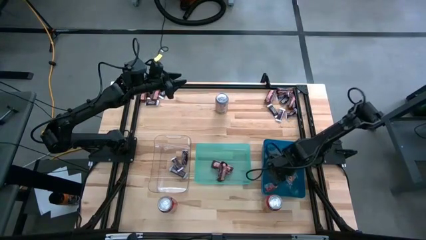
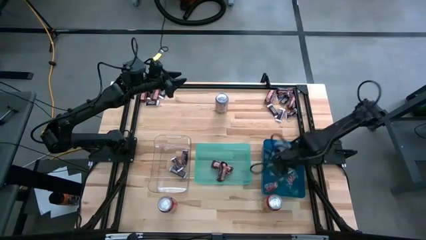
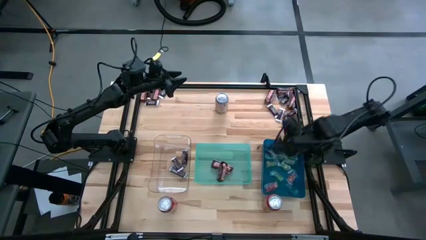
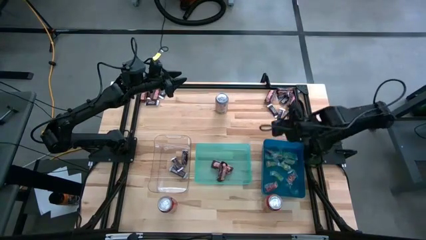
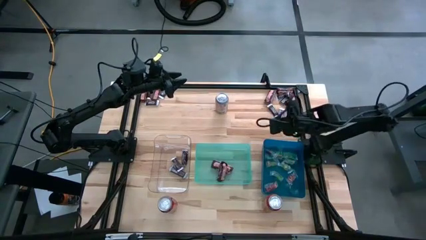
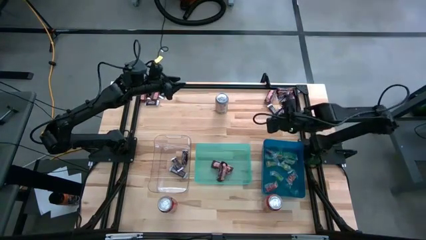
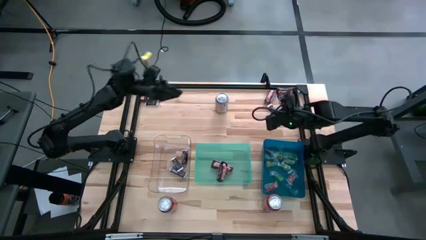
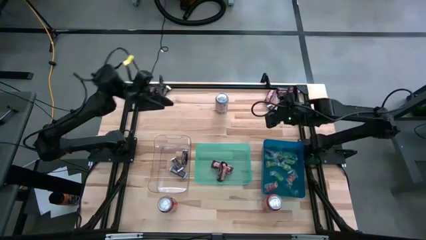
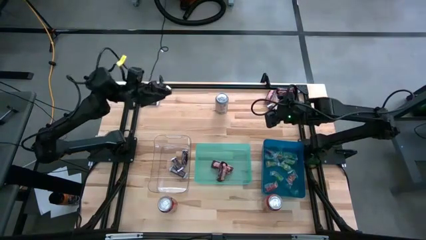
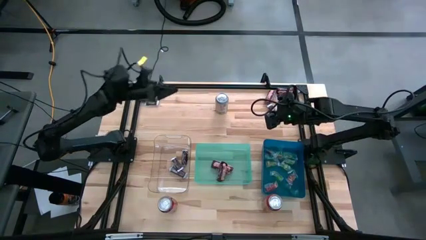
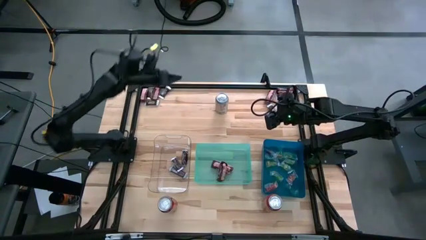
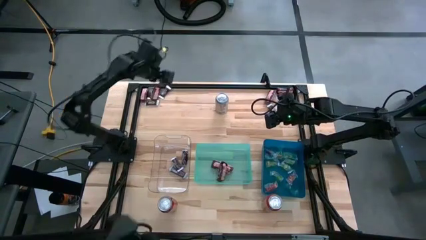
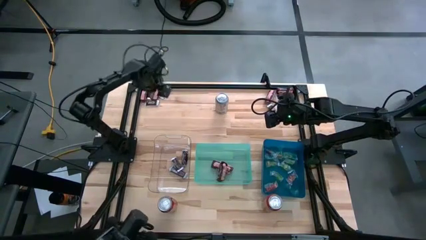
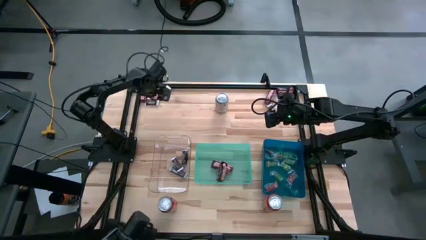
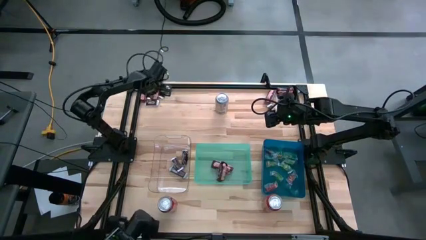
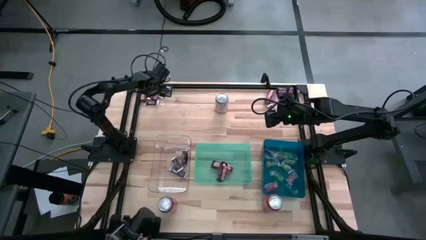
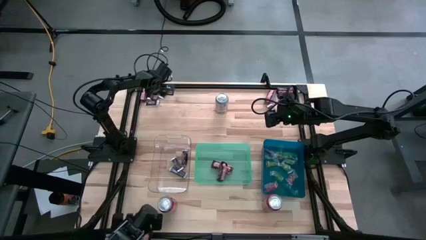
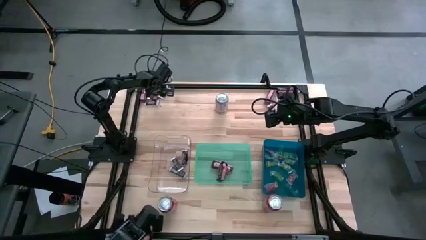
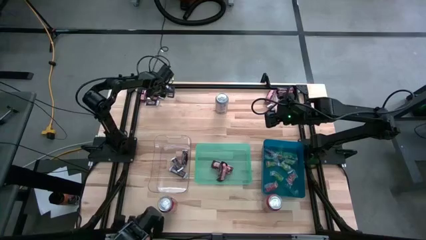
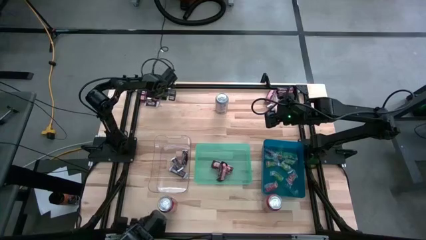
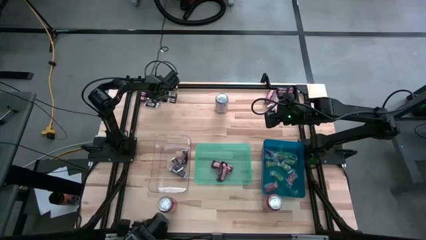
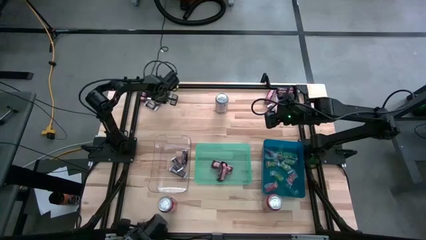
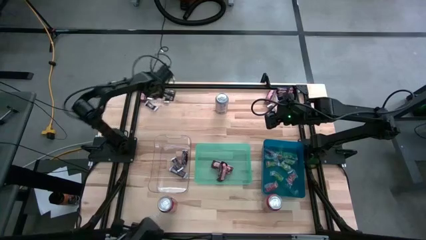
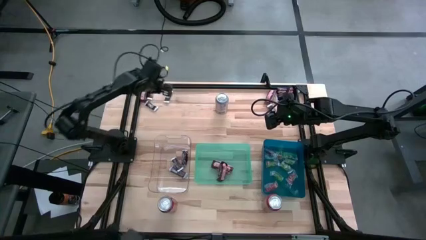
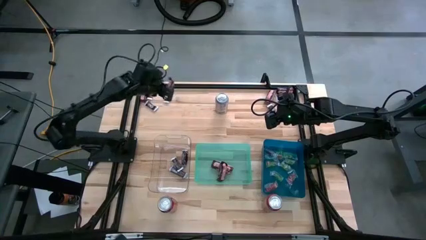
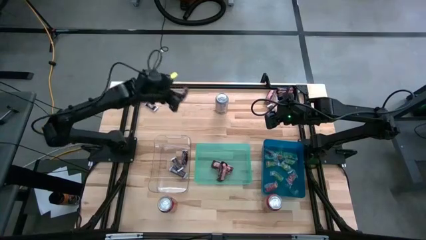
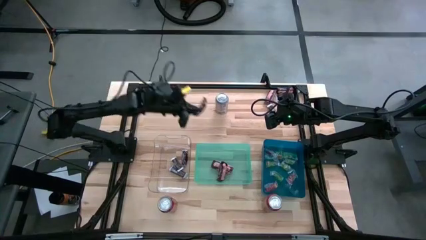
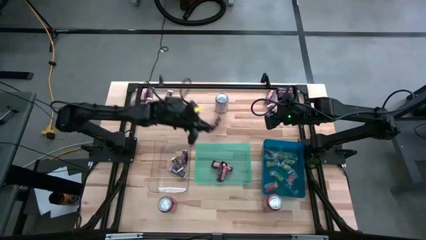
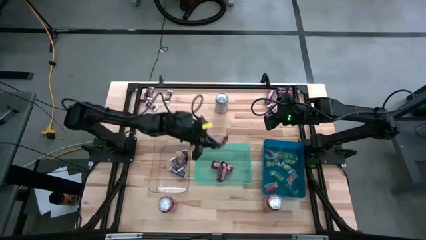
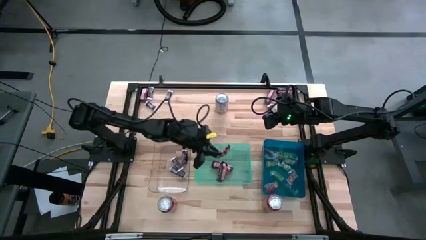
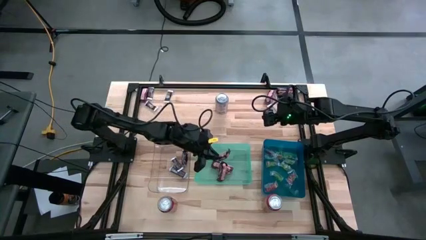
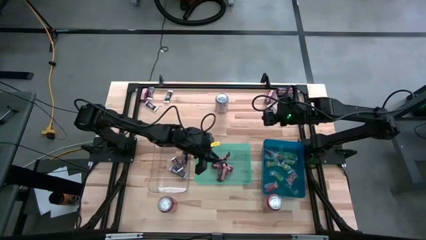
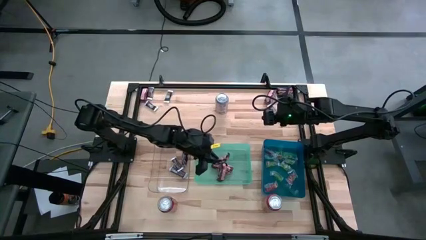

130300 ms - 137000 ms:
Task: Organize candy in baskets
Put the brown chocolate bar into the green bin

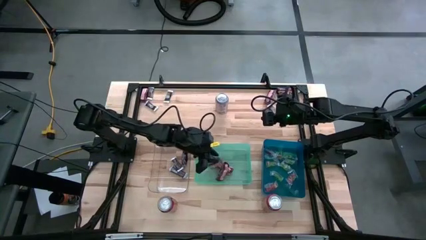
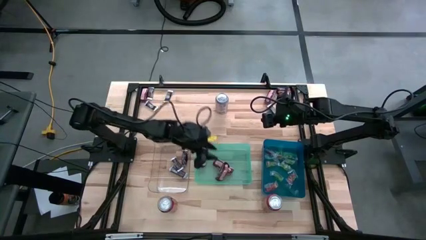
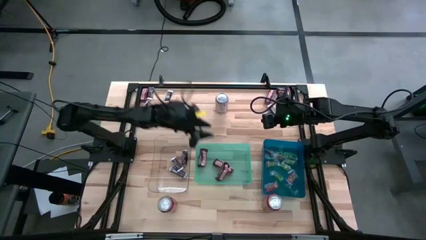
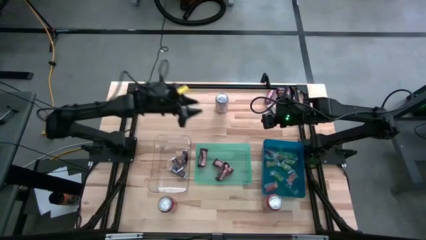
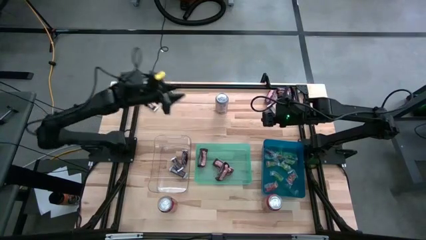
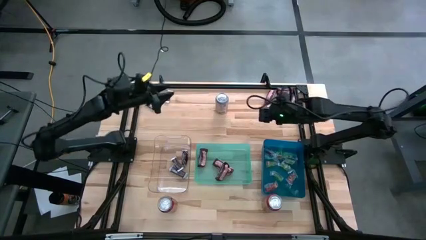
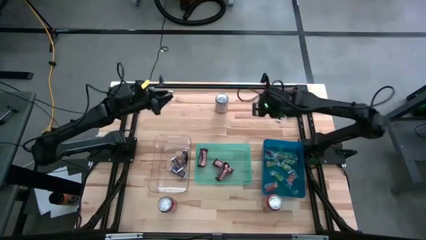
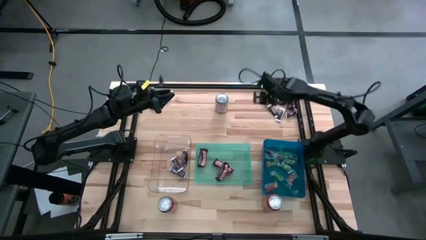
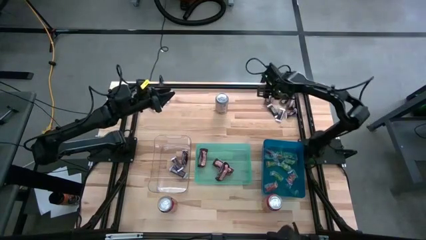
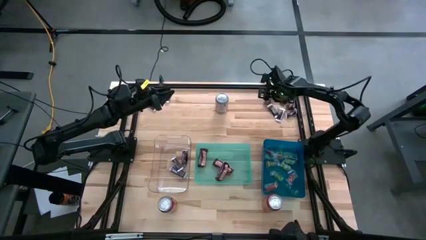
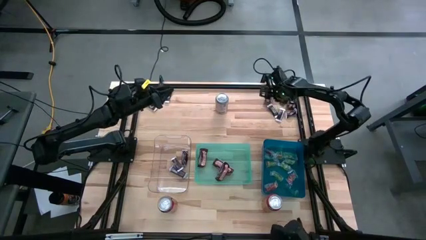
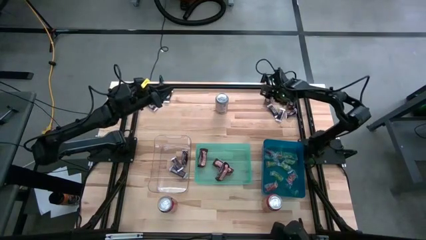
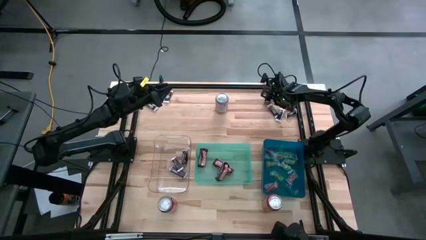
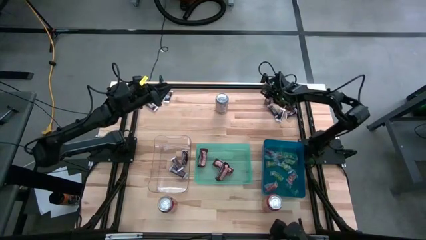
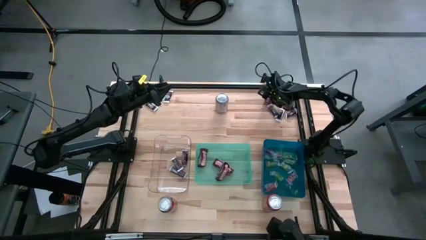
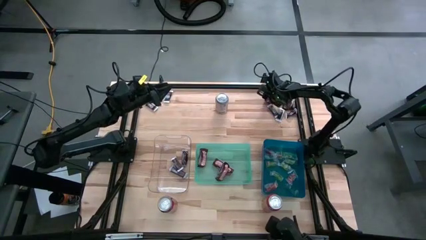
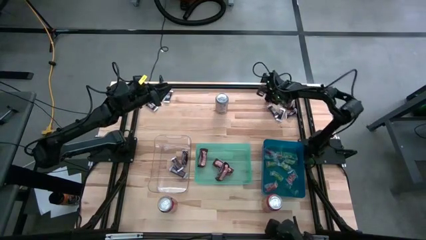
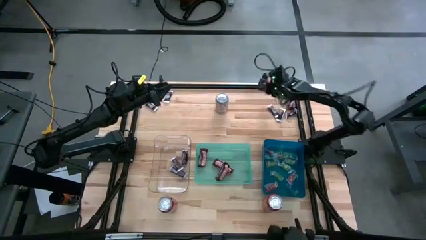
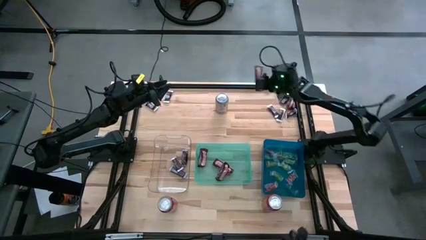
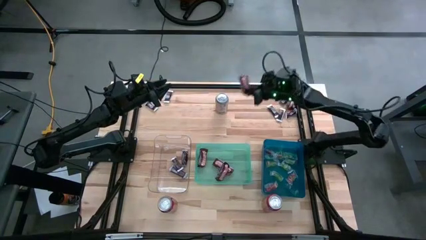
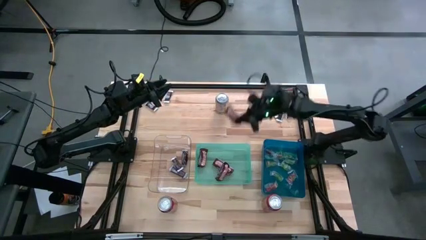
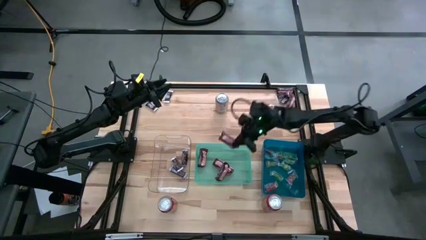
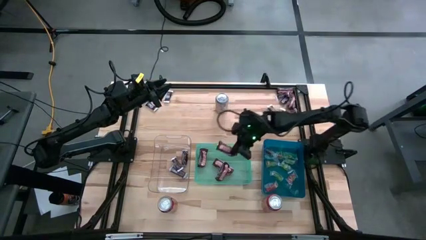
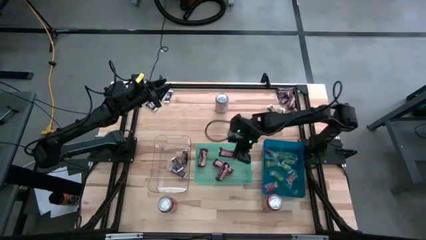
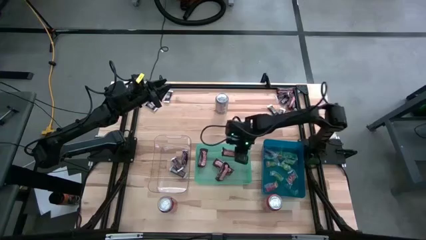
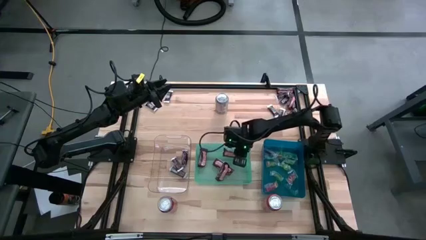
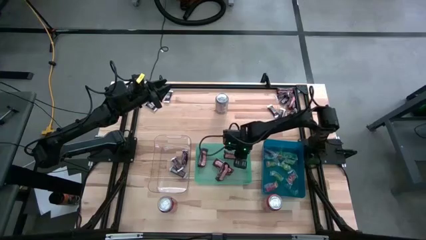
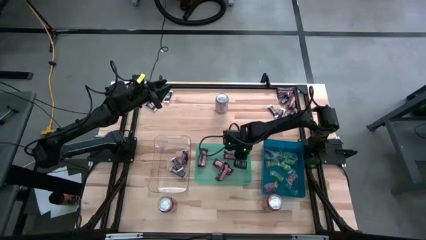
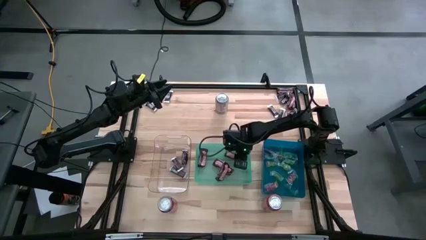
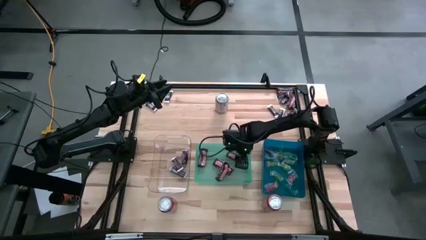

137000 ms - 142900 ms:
Put the brown chocolate bar into the green bin
